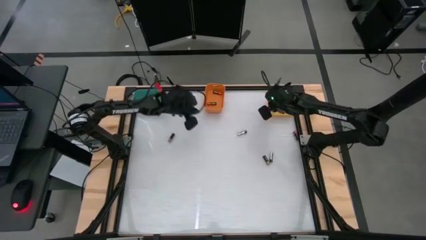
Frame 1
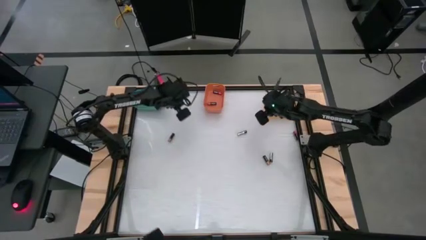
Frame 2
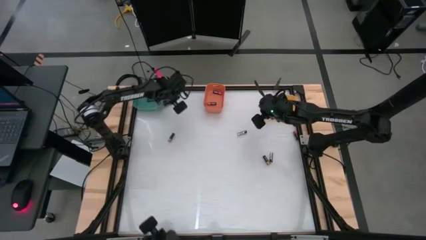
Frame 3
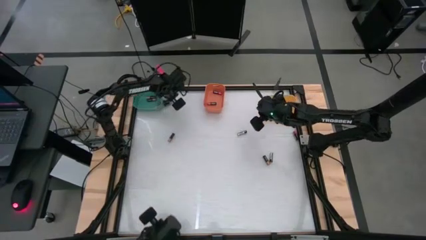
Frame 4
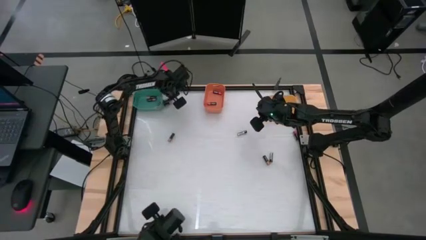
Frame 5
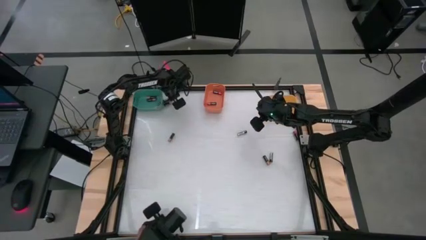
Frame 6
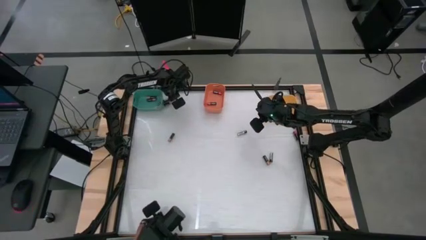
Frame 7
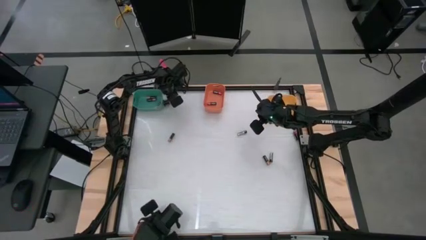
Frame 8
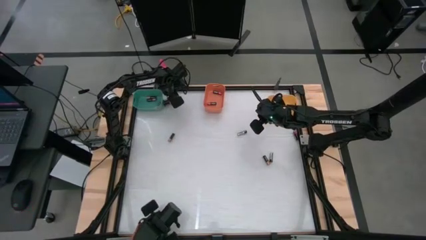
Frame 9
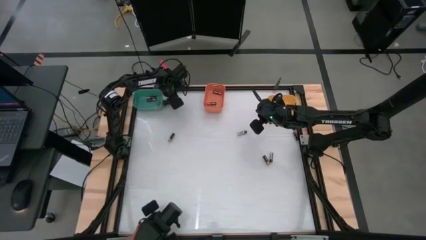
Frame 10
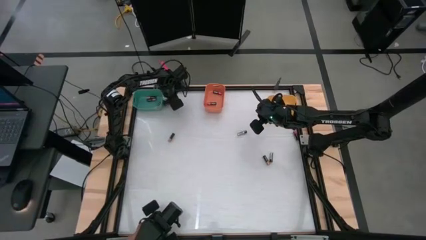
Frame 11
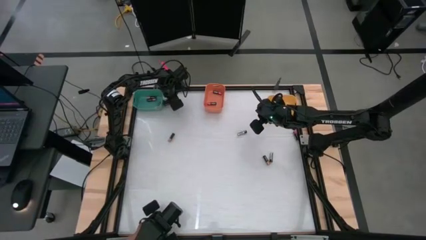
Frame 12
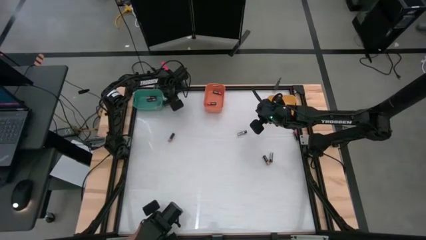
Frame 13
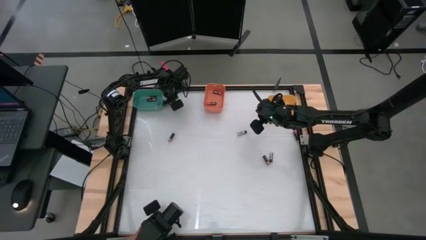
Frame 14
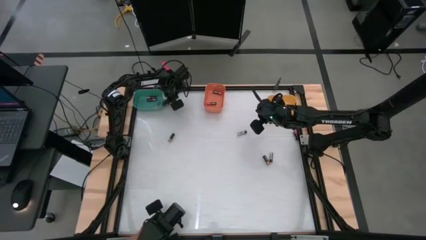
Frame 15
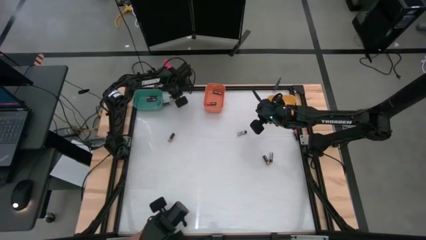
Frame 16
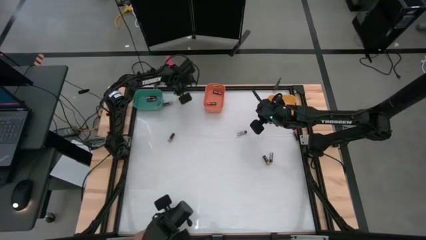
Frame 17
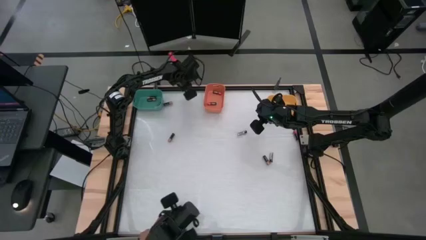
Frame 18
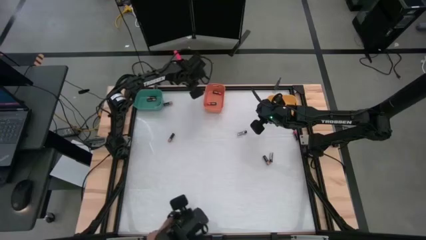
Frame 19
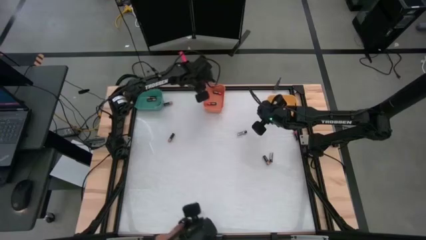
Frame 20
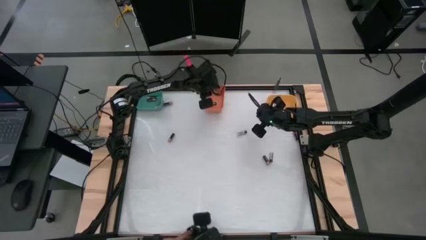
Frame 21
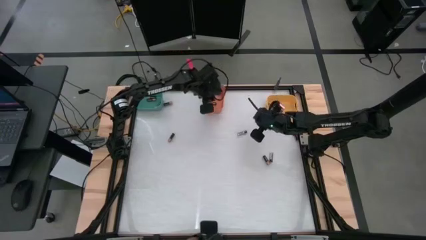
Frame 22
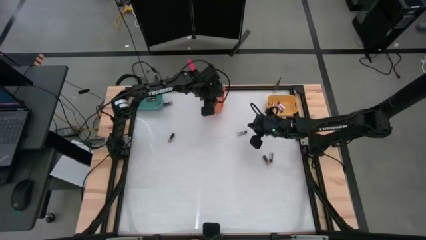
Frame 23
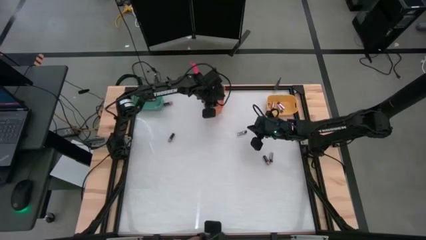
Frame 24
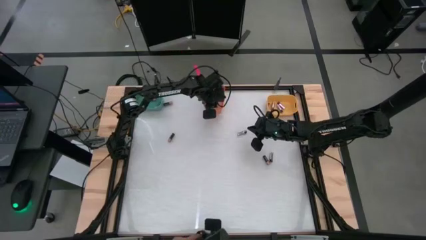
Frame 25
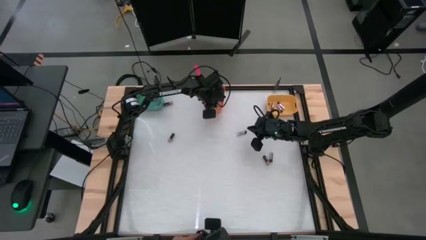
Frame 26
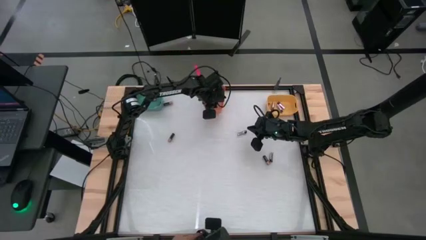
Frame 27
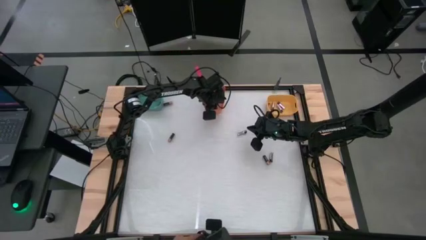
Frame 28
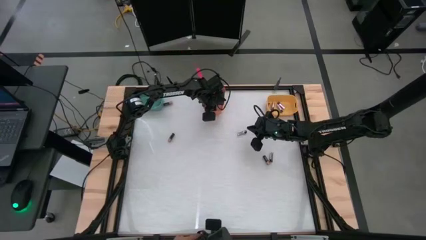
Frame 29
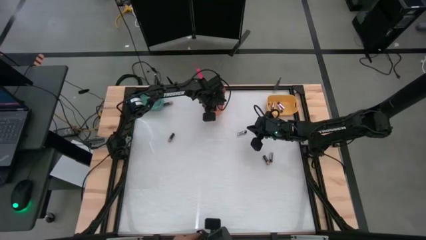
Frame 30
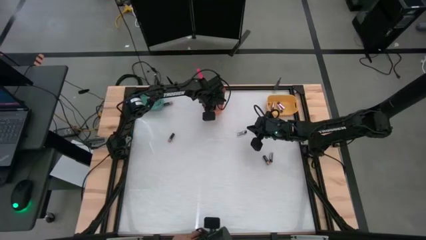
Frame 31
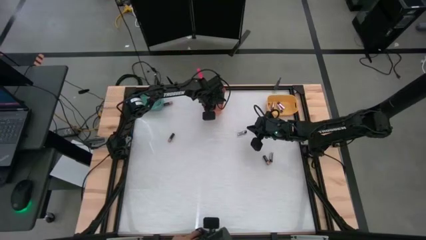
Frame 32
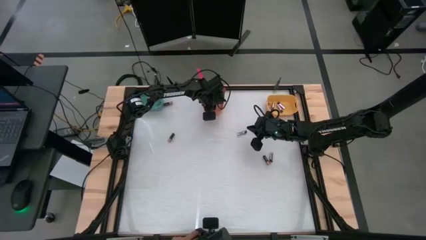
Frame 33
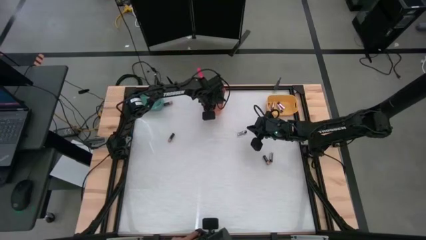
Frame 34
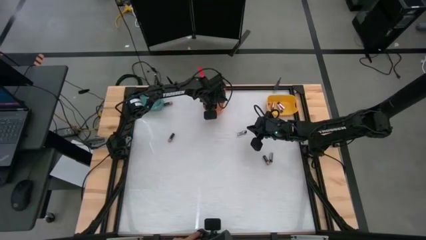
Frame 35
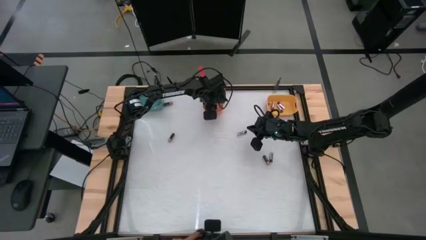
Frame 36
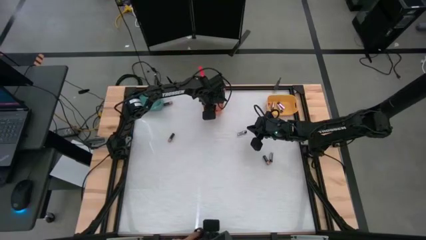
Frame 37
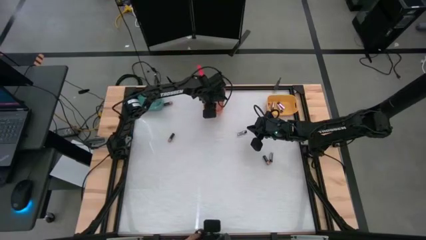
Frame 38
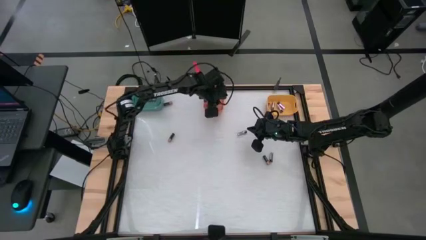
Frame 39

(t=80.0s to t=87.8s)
Task: Sort batteries
Put the top red battery into the orange container

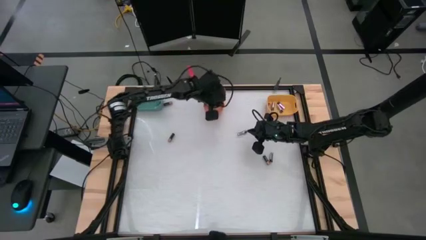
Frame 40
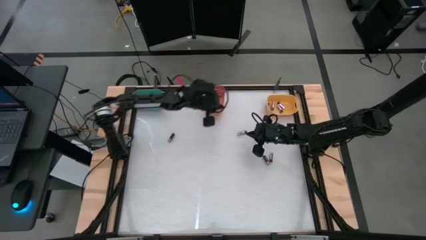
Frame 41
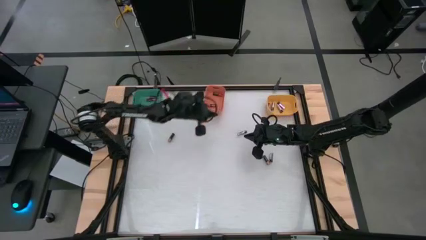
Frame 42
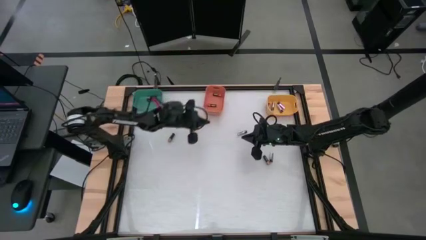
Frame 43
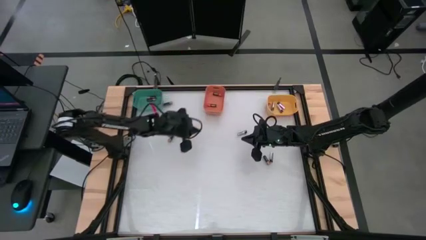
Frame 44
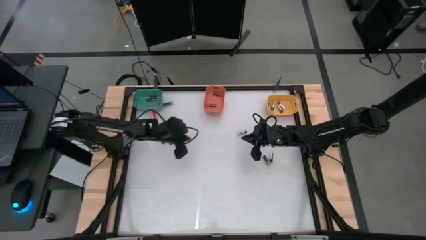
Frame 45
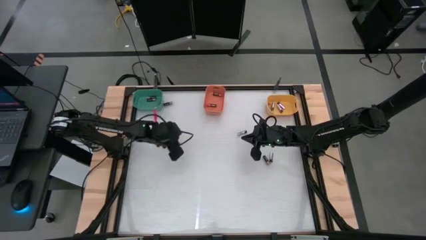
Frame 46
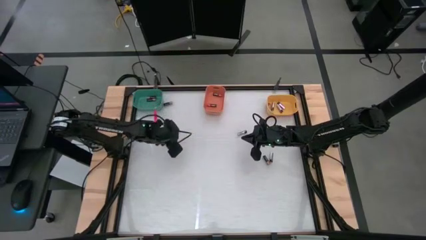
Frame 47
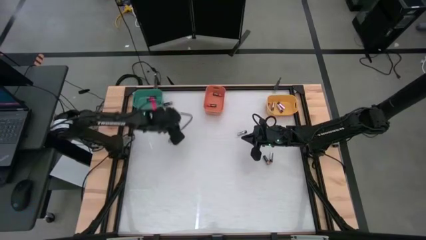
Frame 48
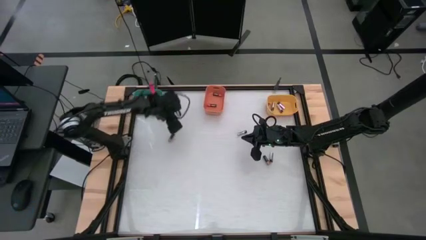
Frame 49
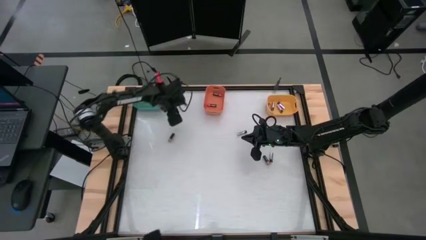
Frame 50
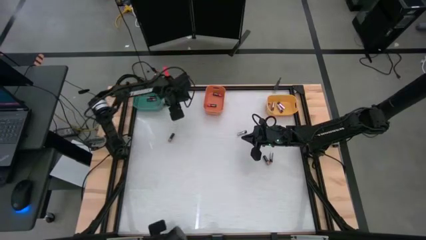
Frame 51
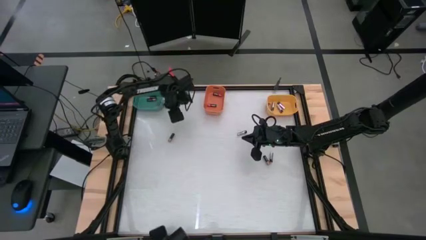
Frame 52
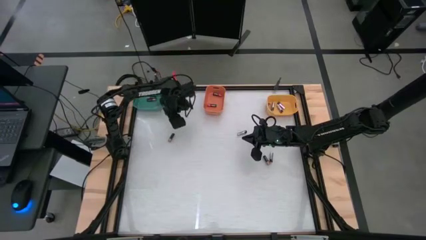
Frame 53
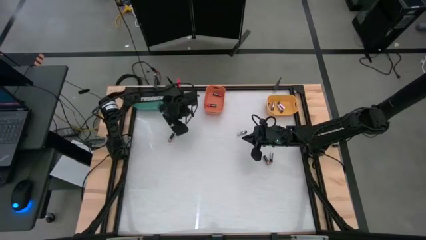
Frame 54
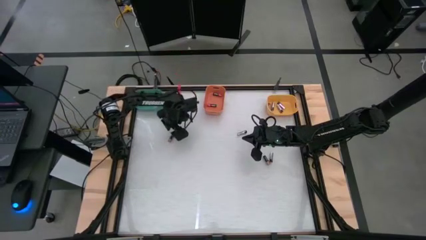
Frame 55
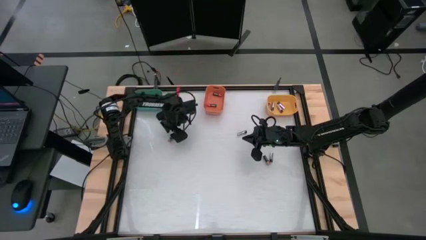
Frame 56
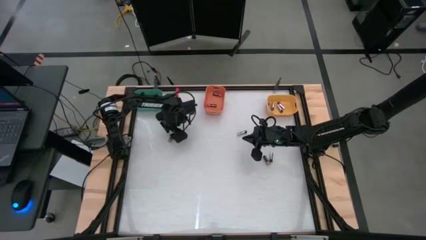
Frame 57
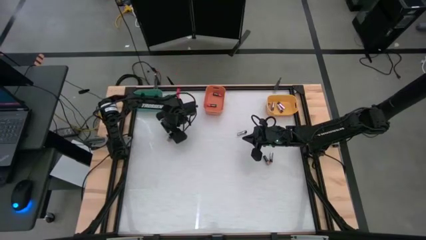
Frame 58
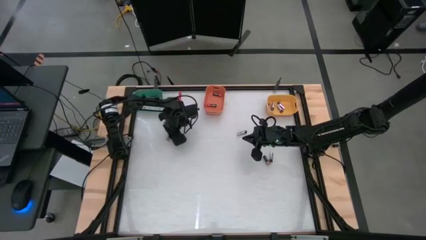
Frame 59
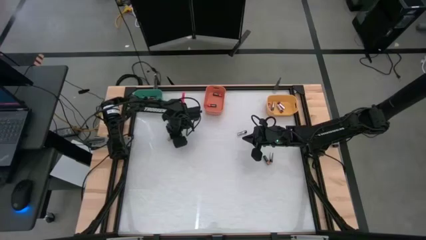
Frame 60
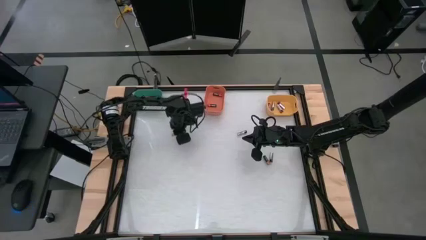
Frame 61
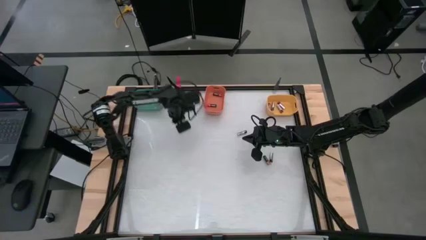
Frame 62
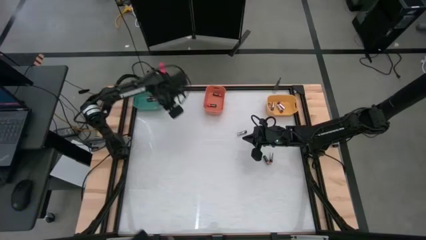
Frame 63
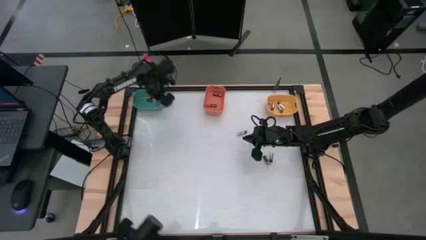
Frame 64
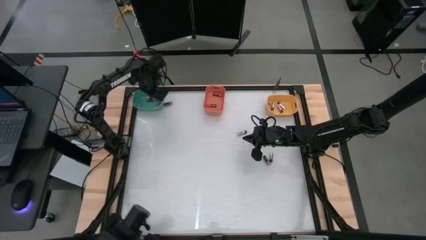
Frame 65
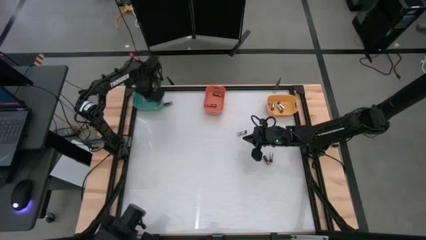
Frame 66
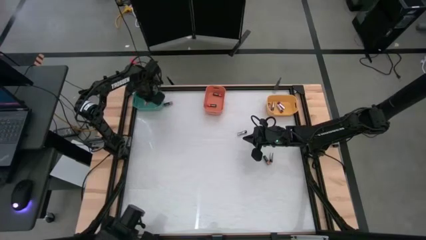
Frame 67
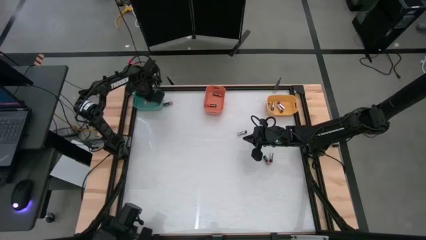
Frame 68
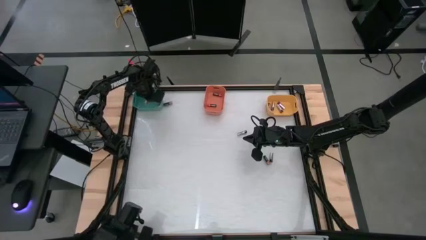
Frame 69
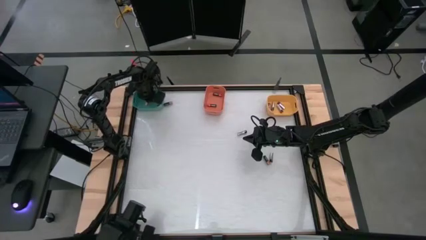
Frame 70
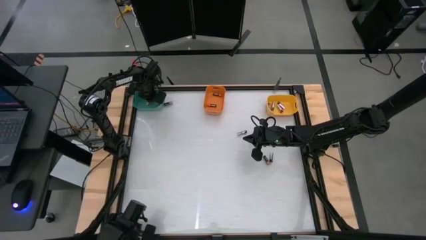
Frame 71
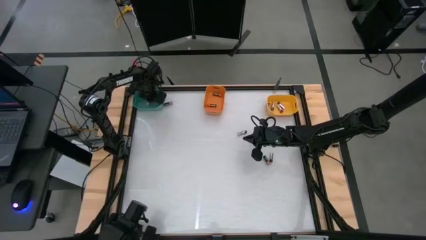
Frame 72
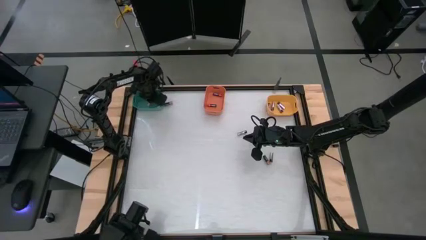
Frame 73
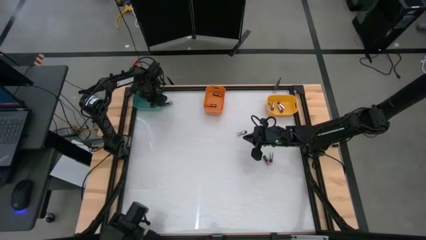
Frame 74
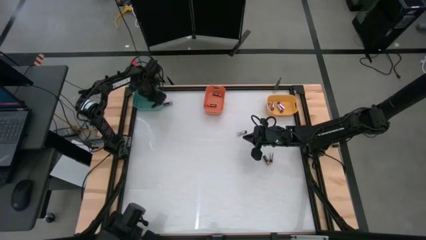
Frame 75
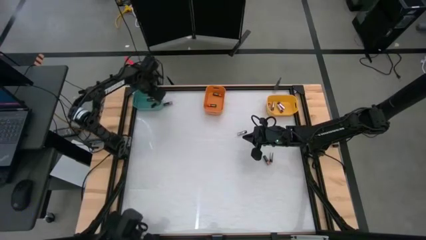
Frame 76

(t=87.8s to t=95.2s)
Put the bottom left copper battery into the green container
